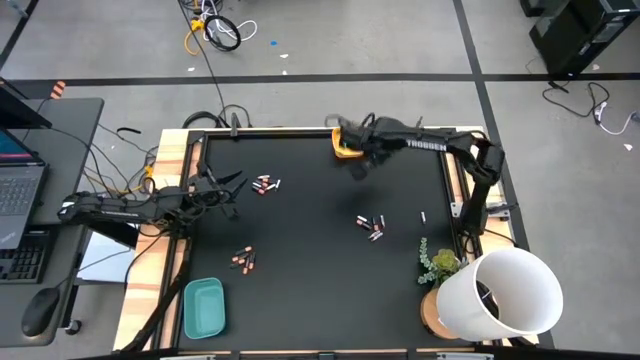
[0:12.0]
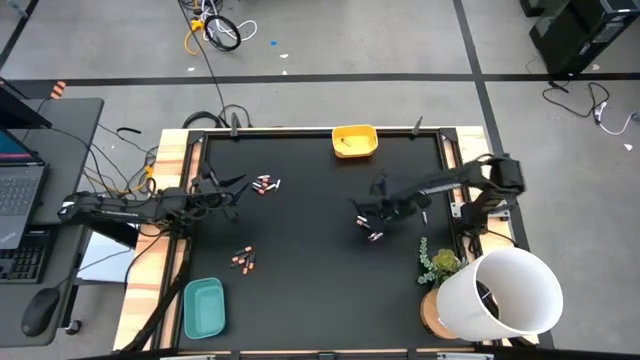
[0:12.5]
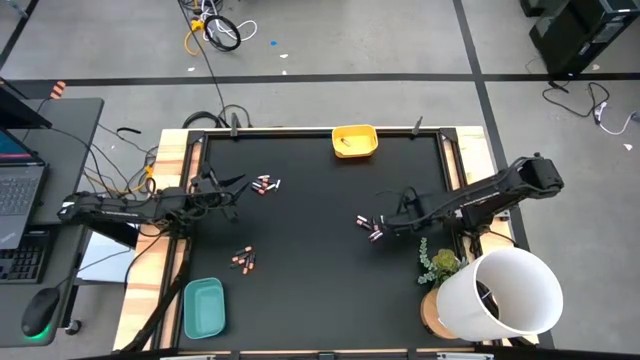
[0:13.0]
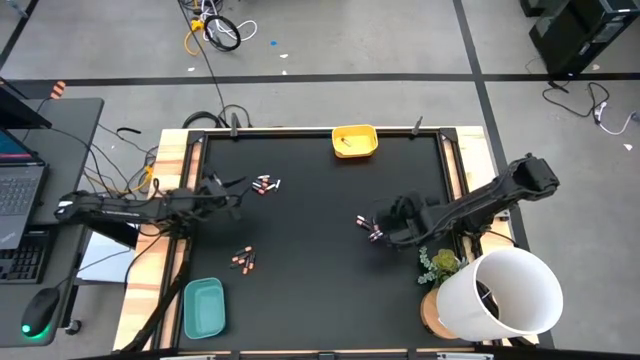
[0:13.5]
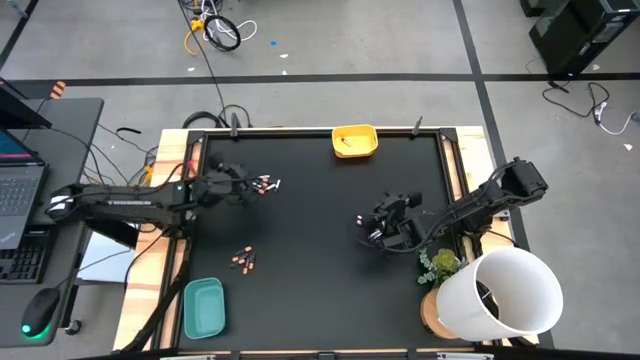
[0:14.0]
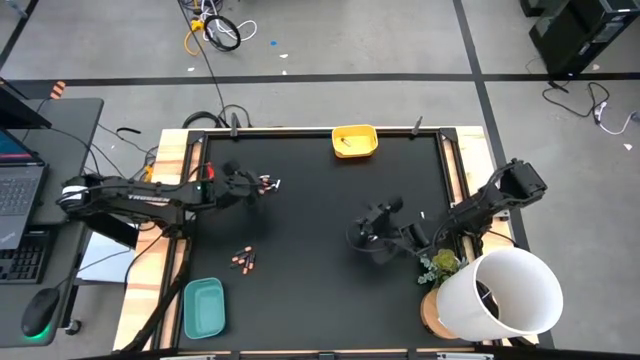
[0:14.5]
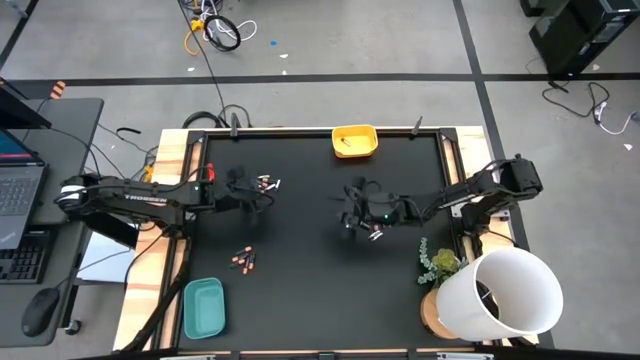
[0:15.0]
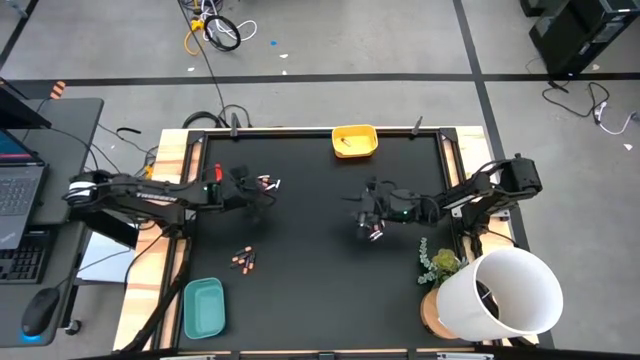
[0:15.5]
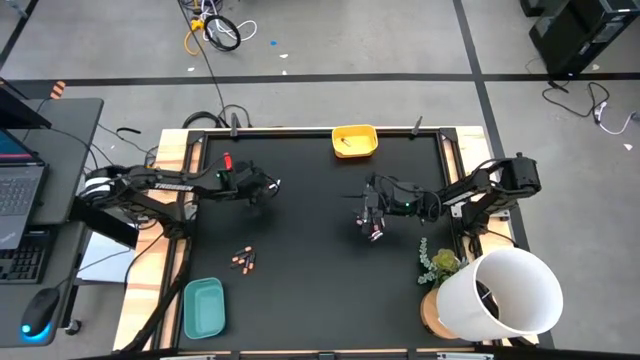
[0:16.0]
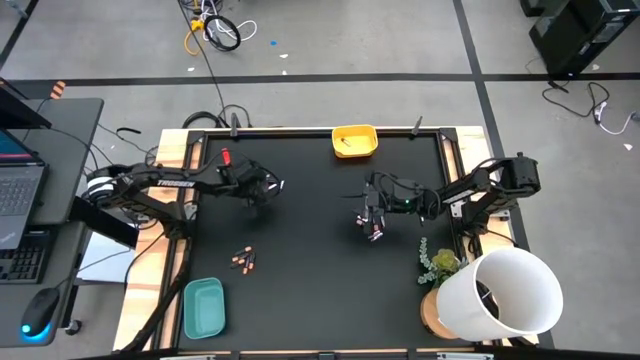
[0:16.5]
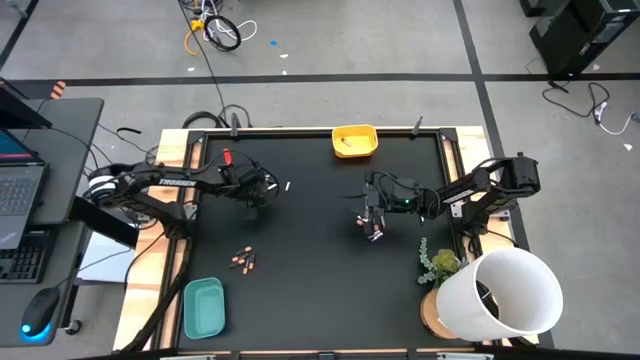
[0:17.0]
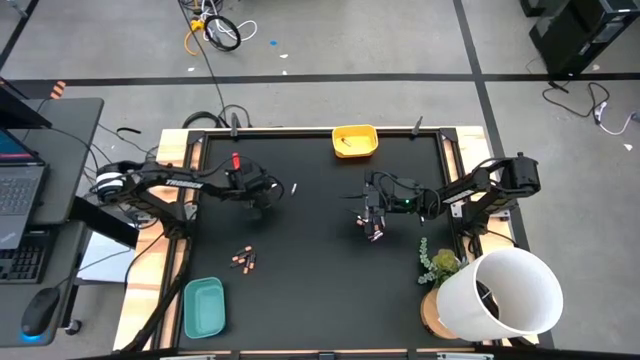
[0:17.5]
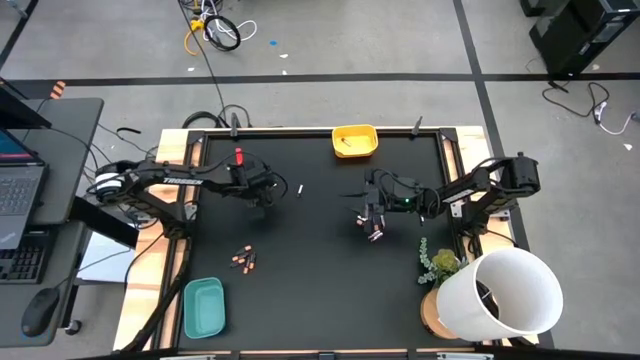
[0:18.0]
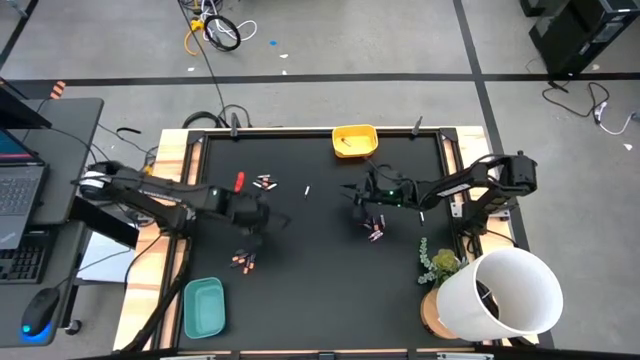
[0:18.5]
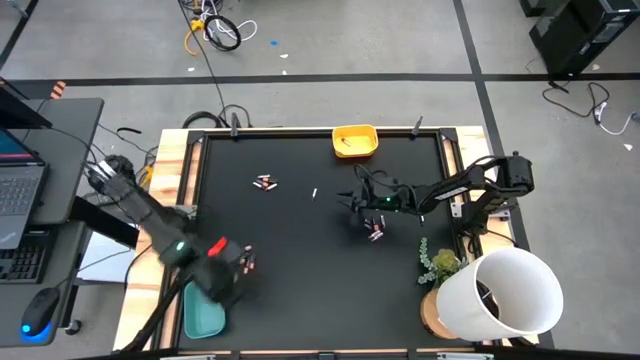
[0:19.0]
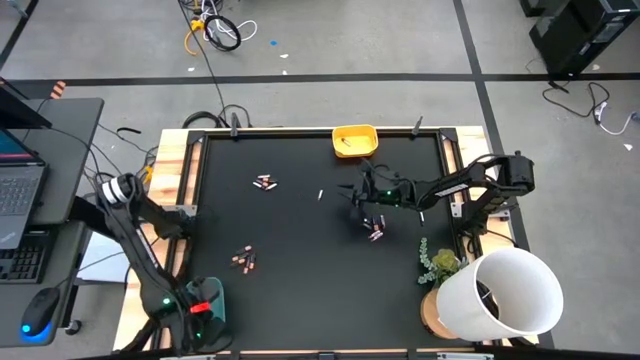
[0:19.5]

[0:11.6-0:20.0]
Task: Sort batteries
Put the black battery into the green bin

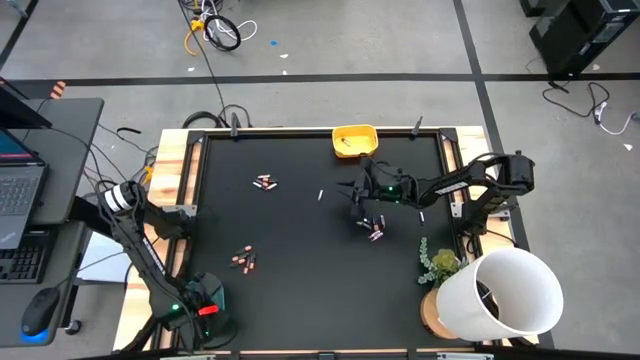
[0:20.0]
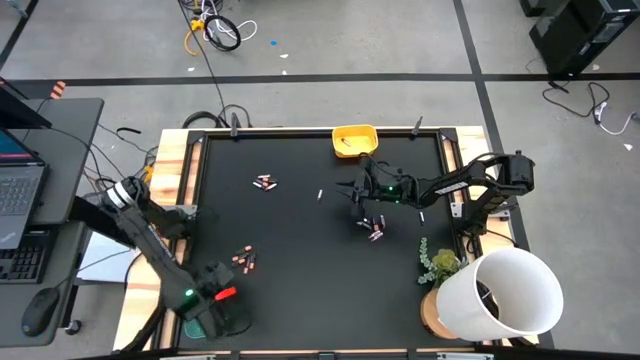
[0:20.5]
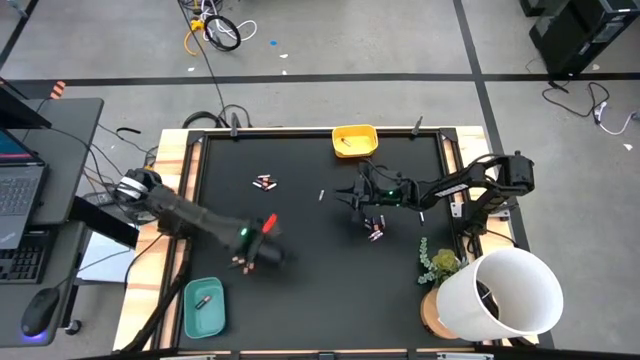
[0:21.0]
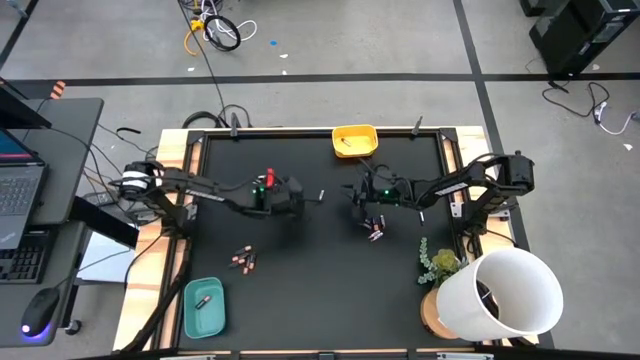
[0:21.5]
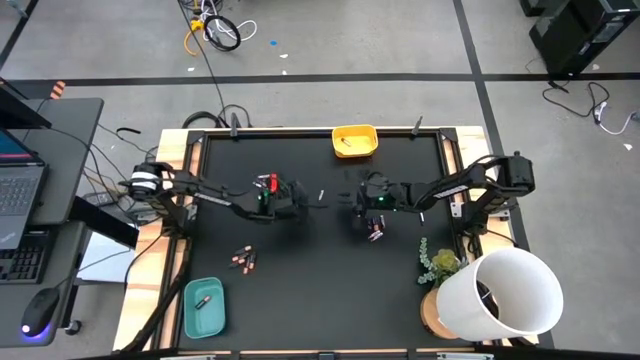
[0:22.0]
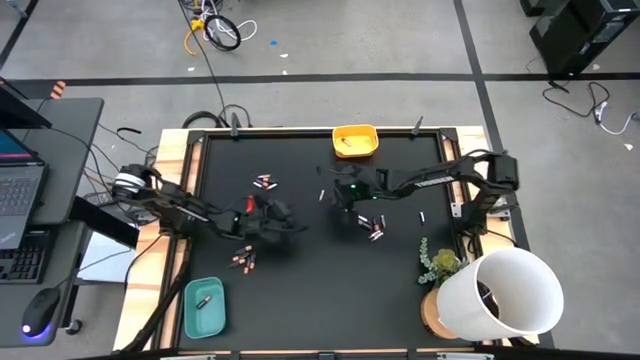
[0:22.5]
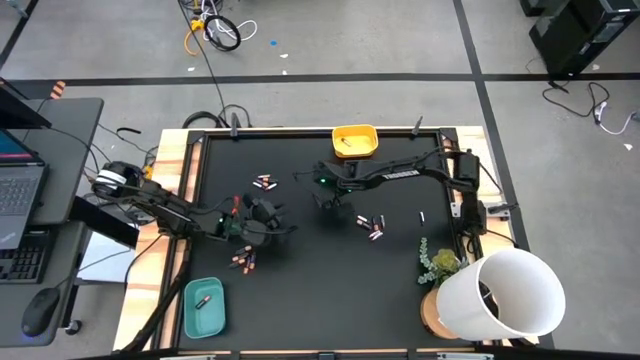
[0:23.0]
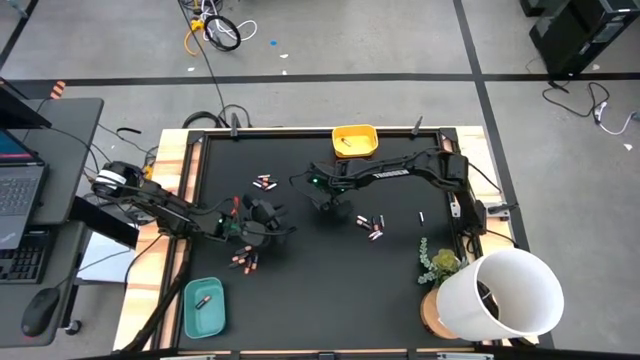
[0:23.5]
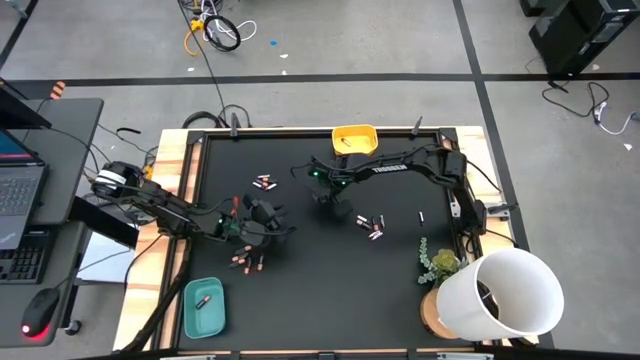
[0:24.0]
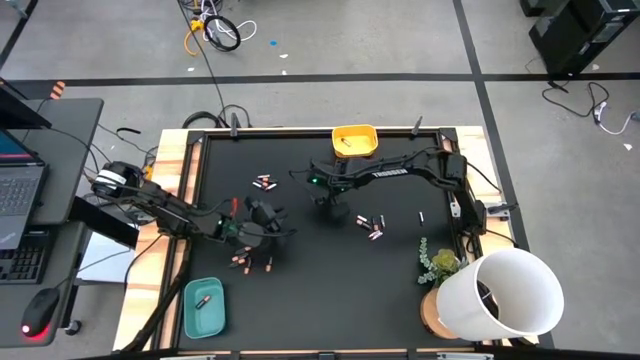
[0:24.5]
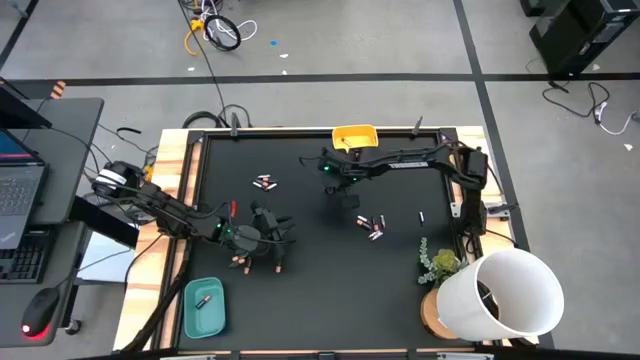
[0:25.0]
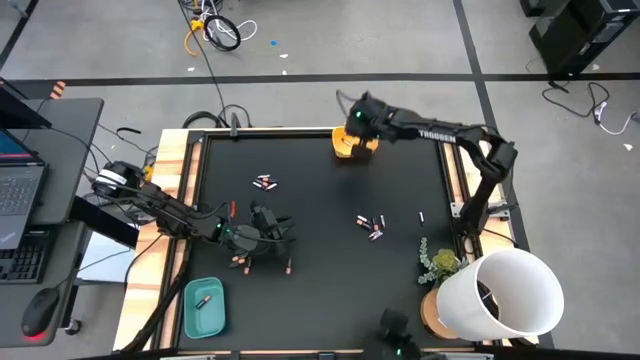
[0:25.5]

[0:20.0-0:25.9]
Put the silver battery into the yellow bin

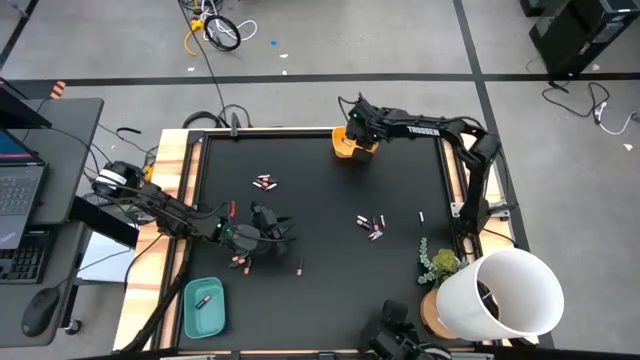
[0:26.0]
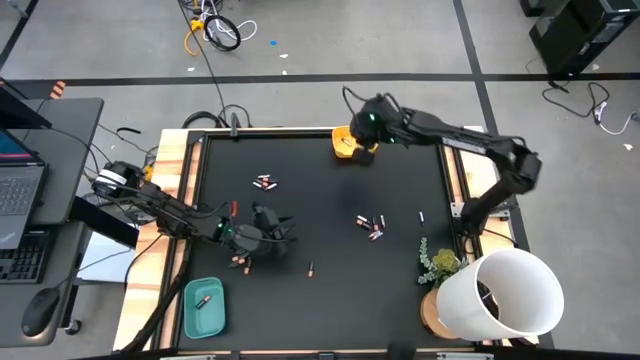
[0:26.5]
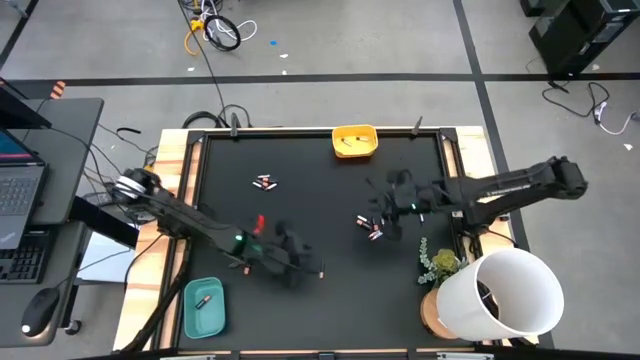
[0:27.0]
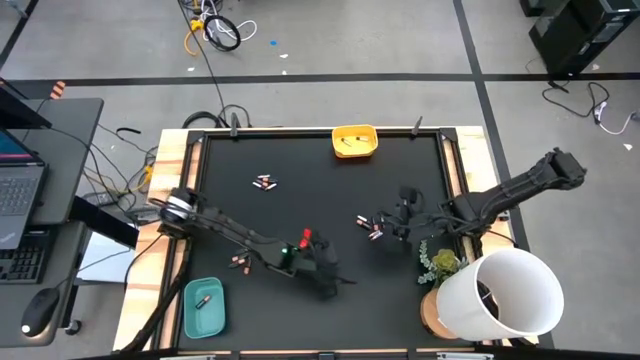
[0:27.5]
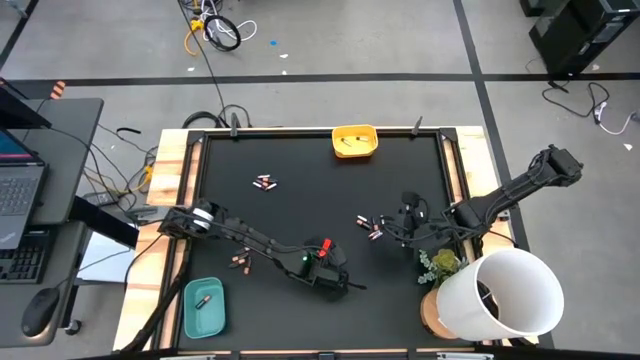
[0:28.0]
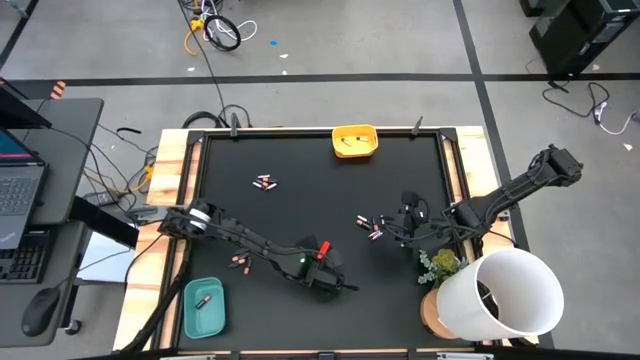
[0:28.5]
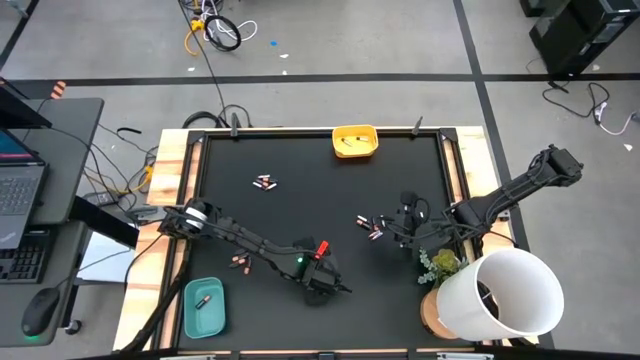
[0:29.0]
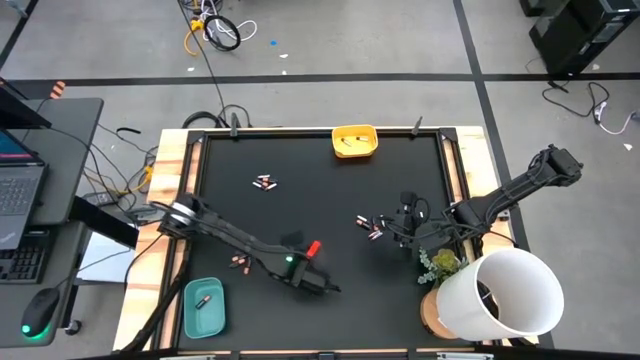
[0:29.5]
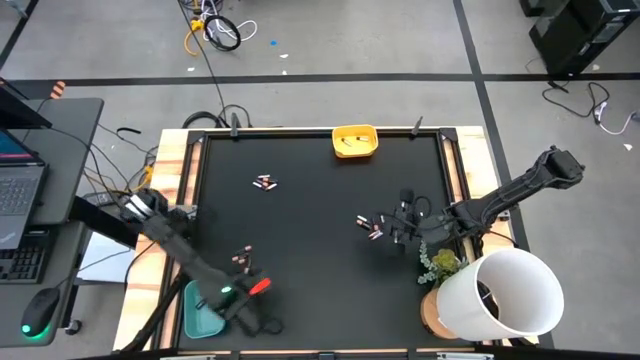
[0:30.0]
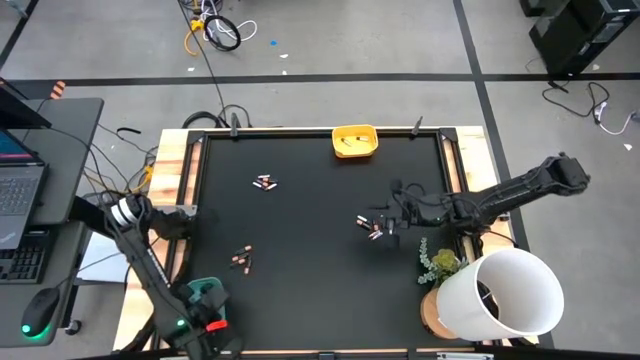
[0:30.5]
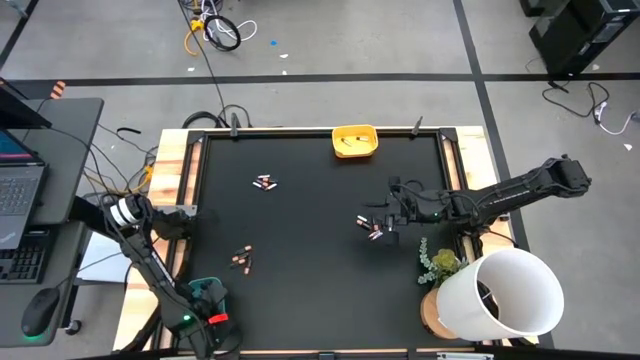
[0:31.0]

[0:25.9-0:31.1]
Put the black battery into the green bin

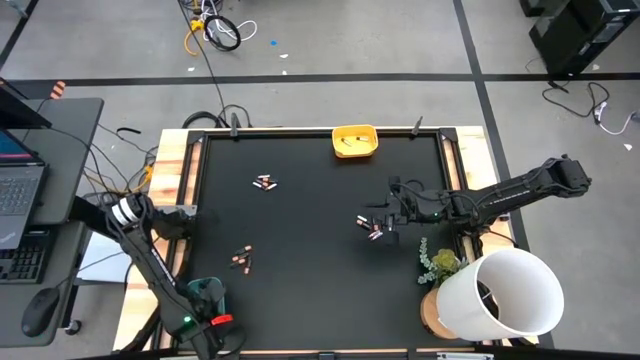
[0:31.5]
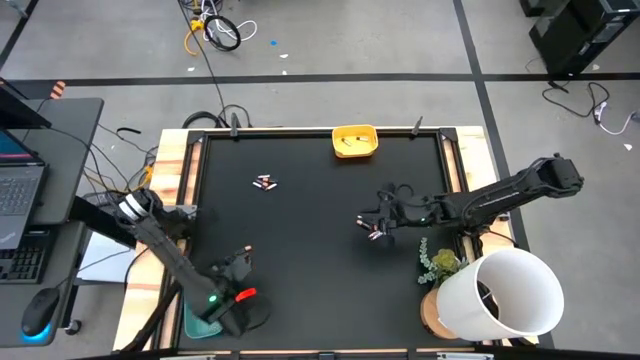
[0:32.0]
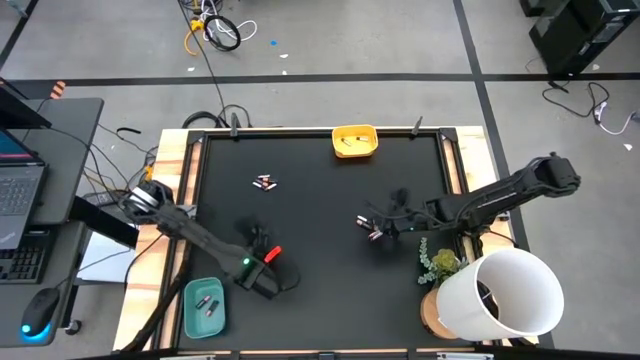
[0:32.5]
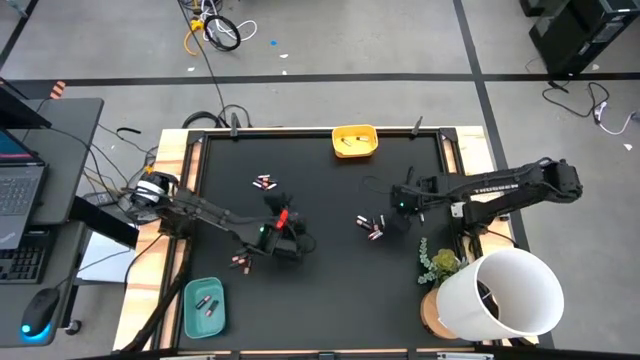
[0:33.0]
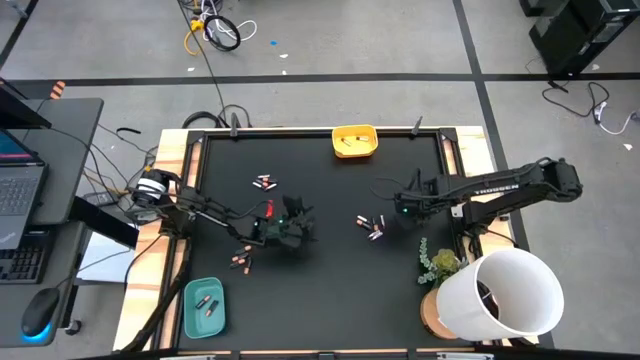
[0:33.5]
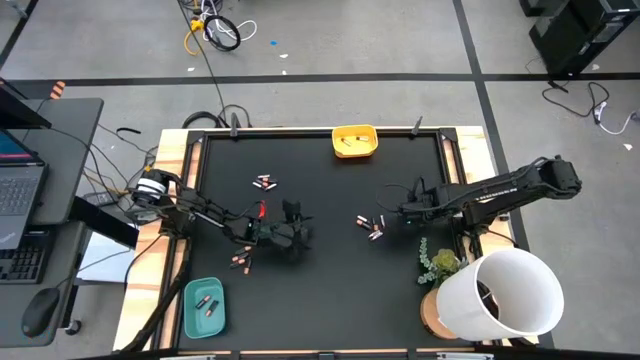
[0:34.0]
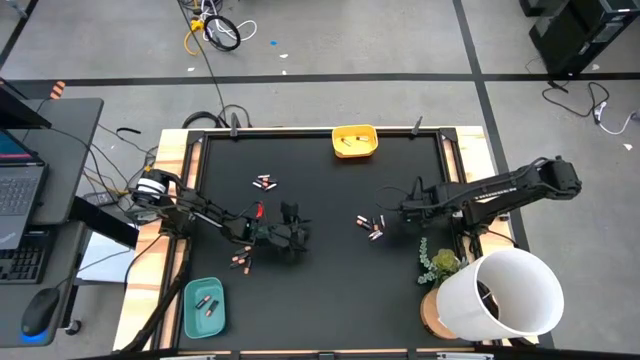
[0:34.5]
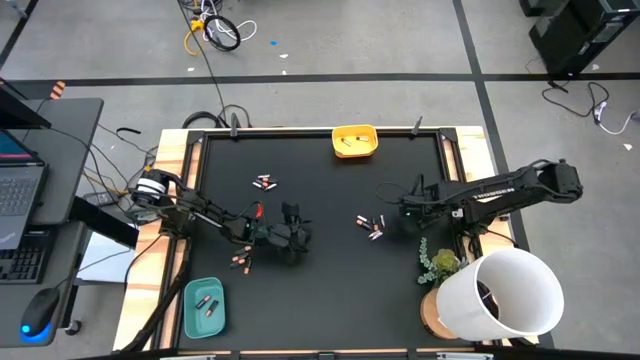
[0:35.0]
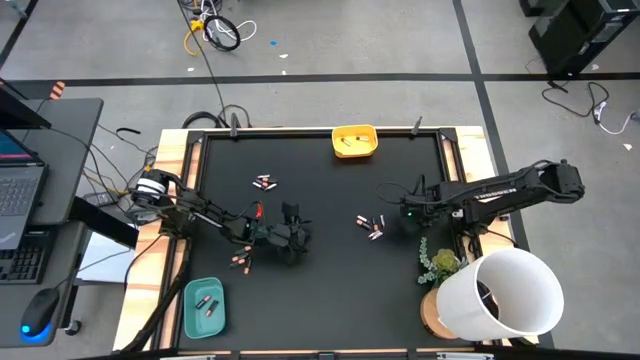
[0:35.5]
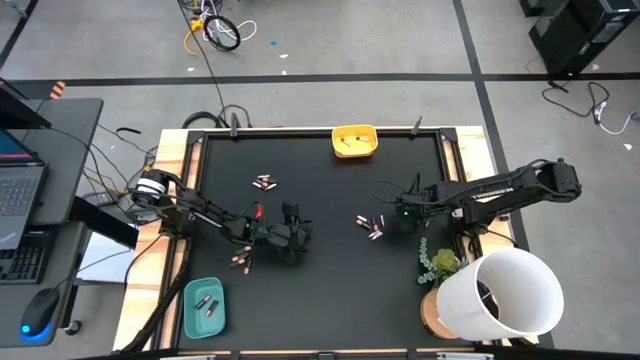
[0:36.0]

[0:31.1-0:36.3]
Put the silver battery into the yellow bin
